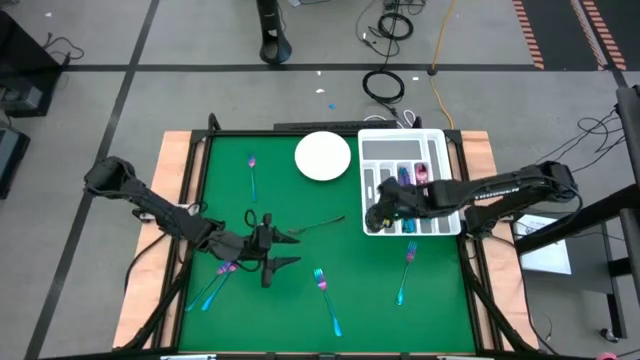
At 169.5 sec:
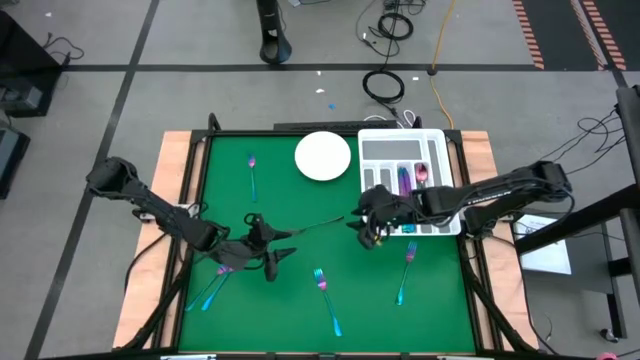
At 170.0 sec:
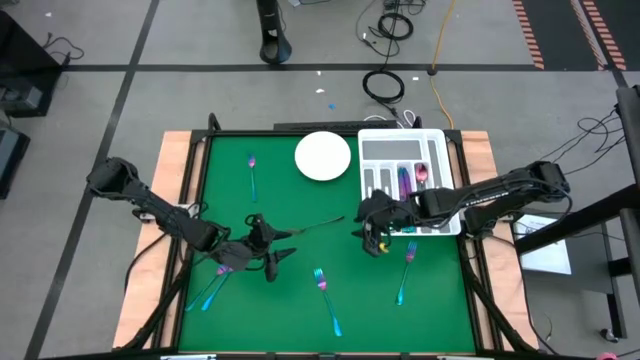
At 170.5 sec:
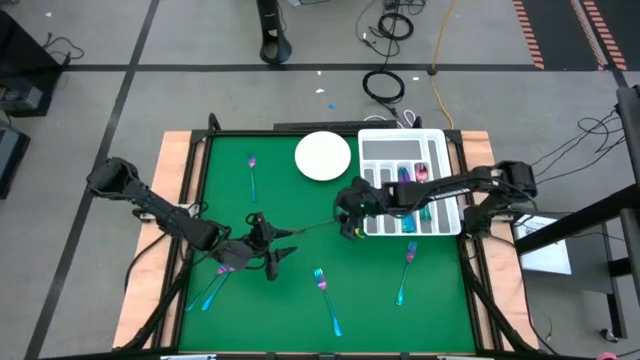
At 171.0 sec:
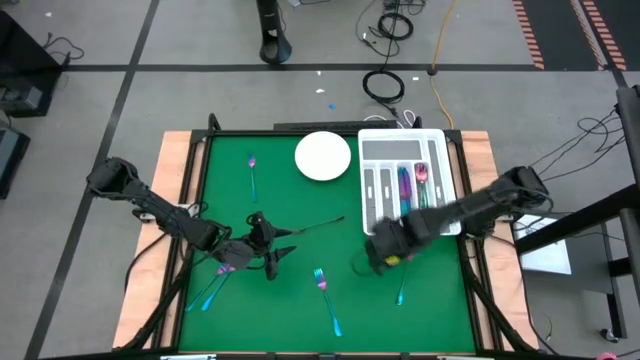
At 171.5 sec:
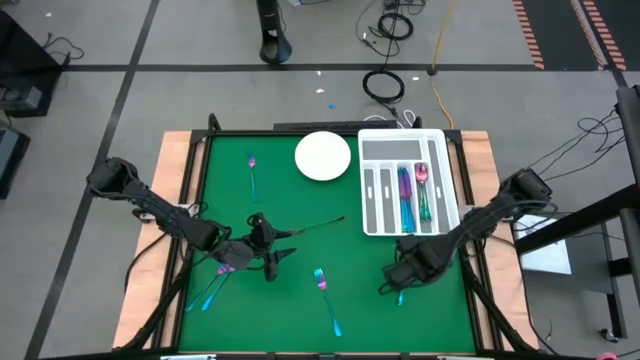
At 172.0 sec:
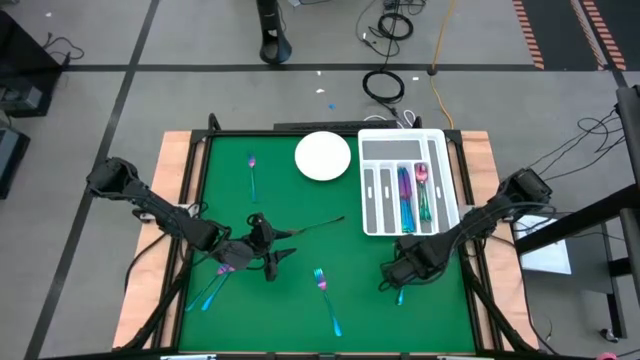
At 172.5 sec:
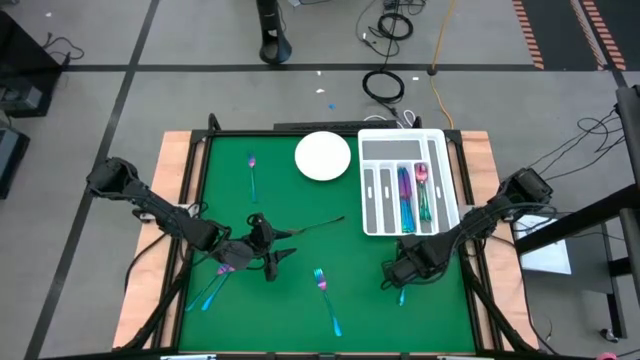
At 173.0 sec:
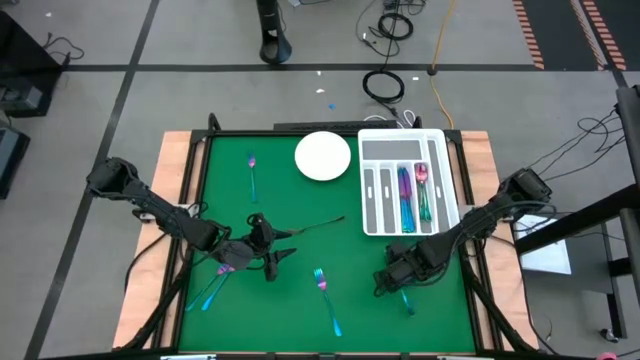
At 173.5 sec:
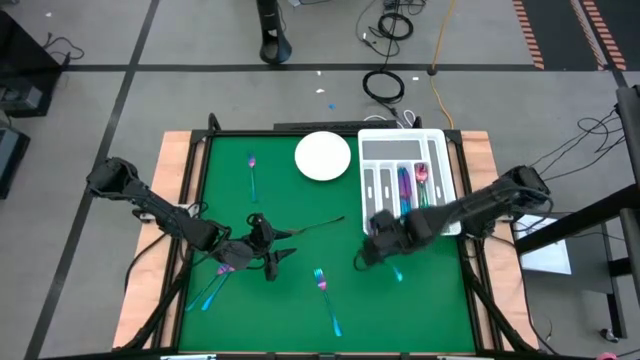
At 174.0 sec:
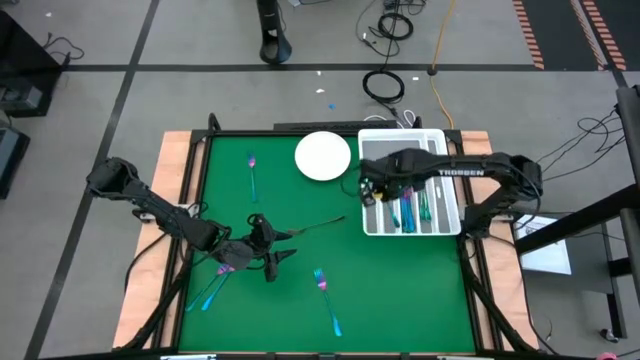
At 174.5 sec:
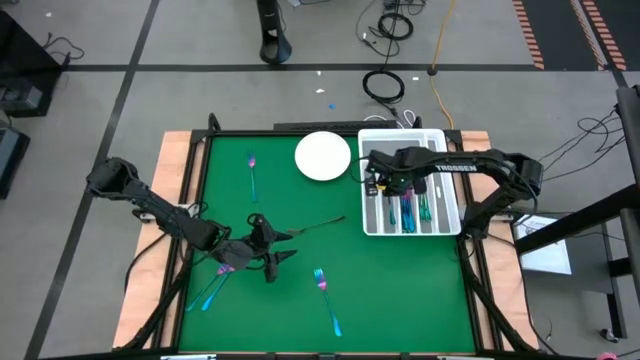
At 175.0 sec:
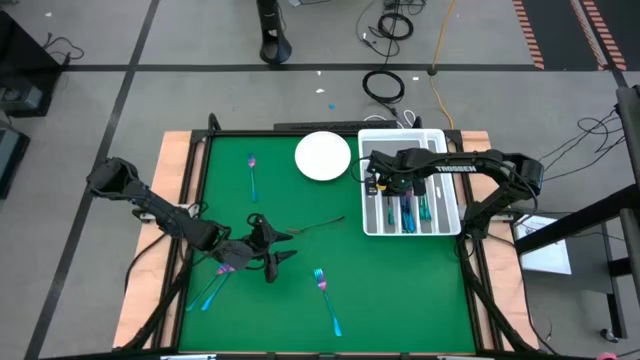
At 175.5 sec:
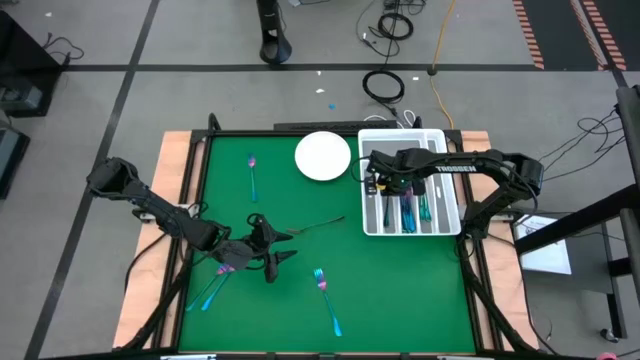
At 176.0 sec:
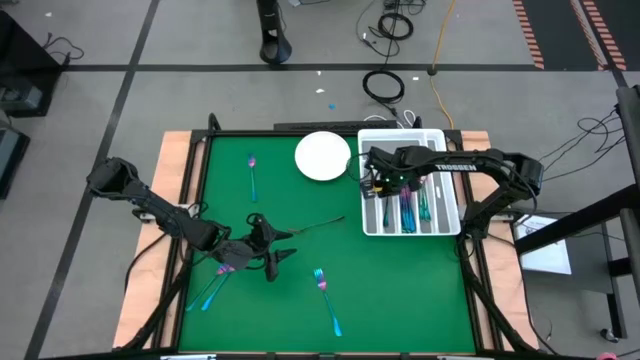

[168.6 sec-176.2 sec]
Task: Sort silverware
Put the iridescent fork into the white silverware tray

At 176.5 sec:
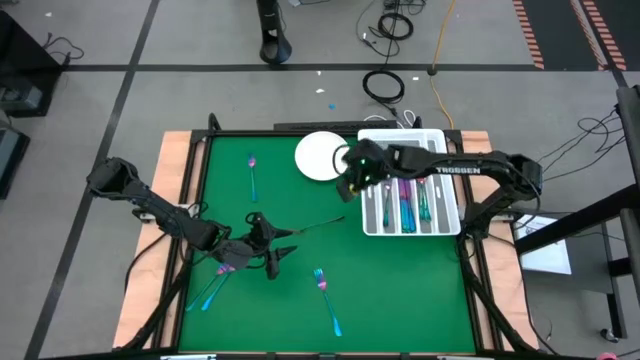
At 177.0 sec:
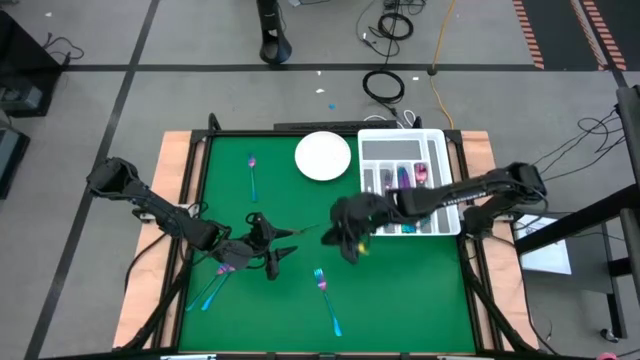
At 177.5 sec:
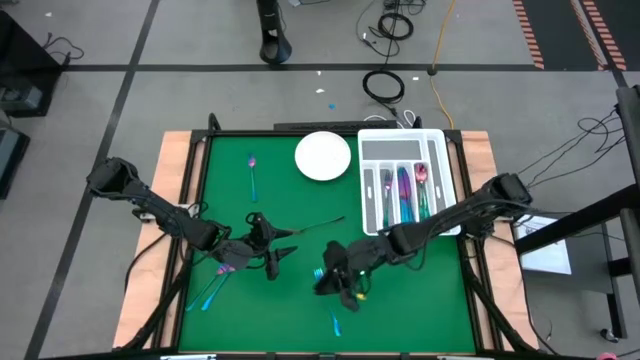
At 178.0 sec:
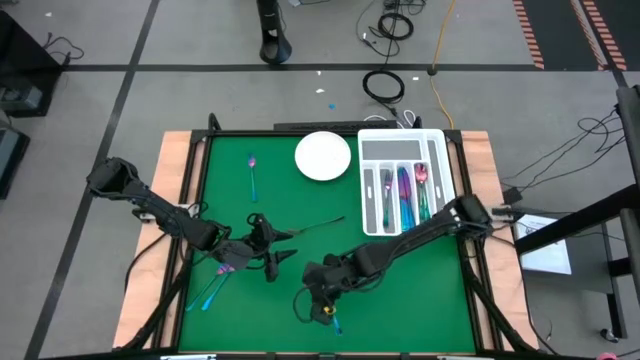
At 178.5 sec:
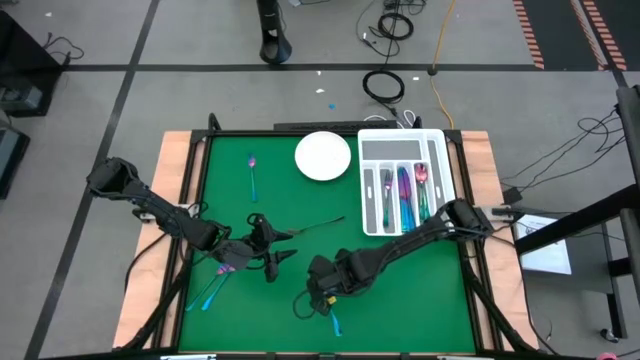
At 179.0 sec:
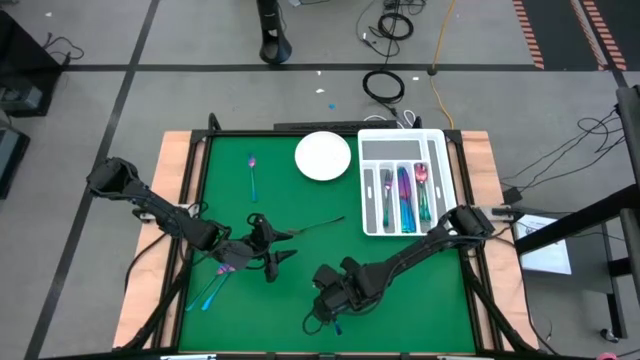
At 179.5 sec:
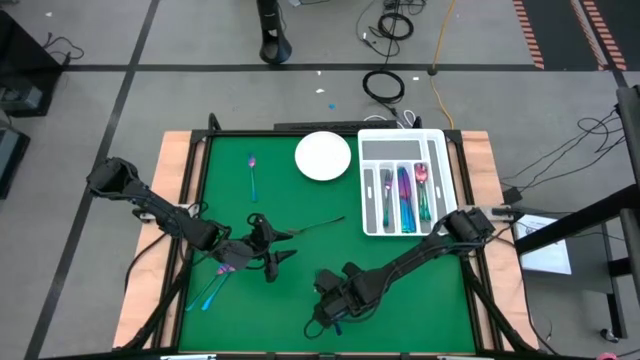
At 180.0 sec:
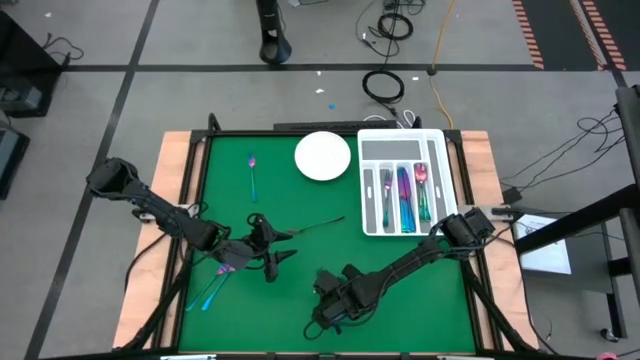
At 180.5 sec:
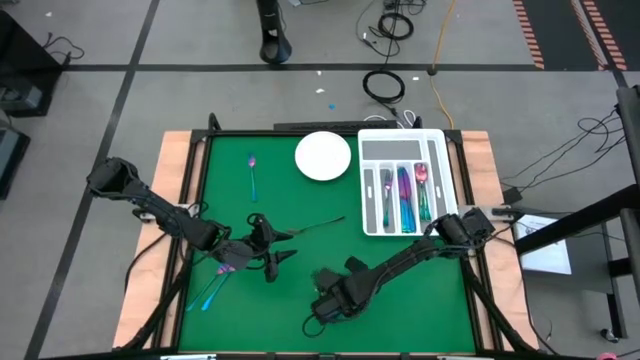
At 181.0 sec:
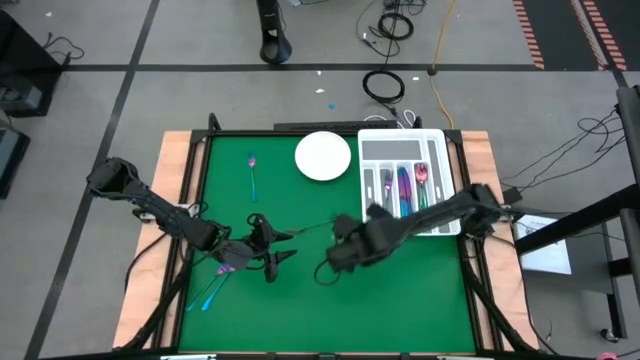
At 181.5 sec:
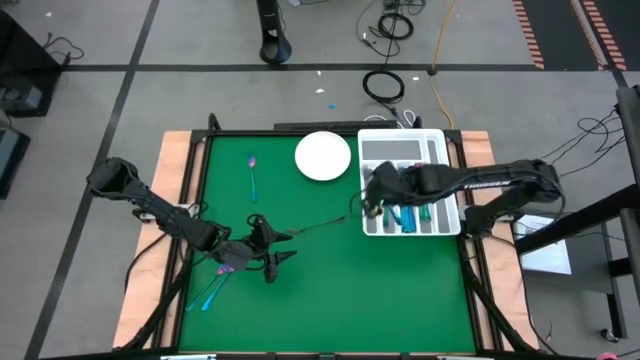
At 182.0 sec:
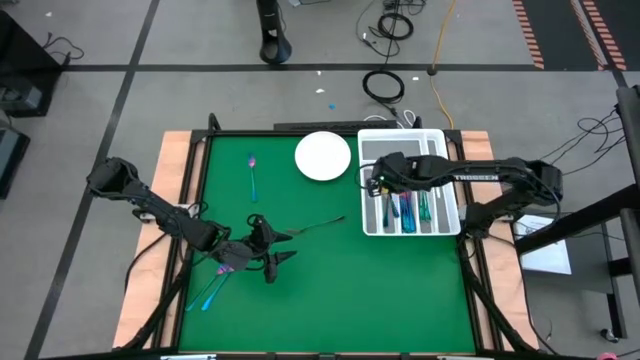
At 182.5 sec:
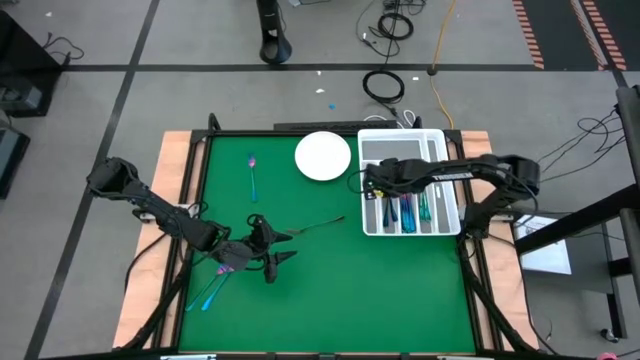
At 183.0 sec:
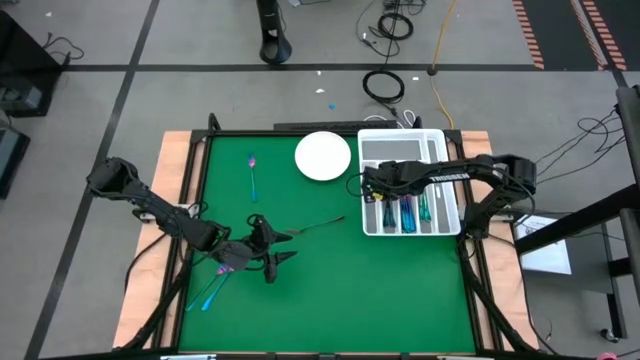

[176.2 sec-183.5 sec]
Put the iridescent fork into the white silverware tray

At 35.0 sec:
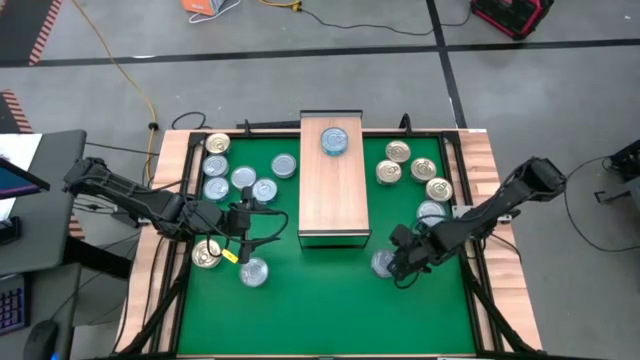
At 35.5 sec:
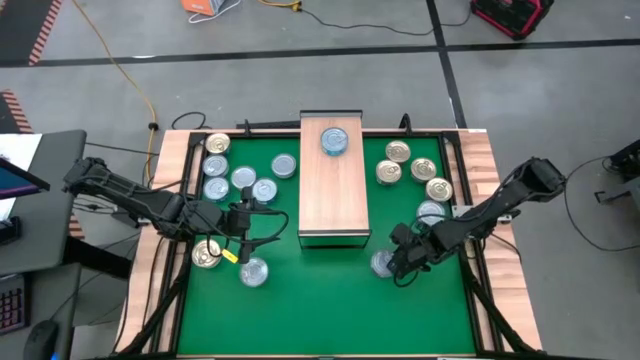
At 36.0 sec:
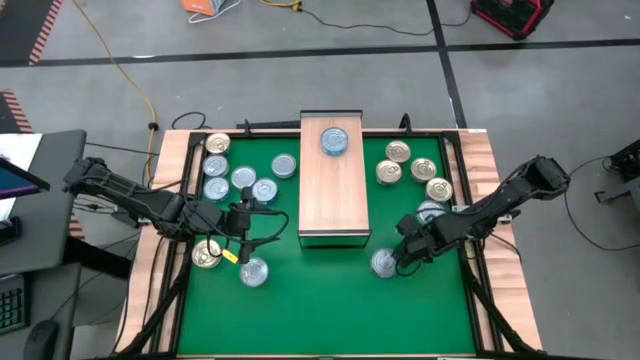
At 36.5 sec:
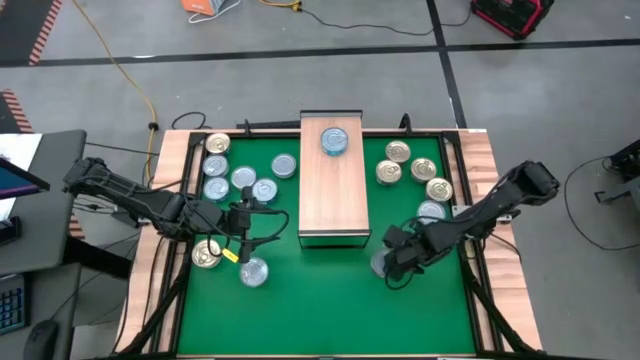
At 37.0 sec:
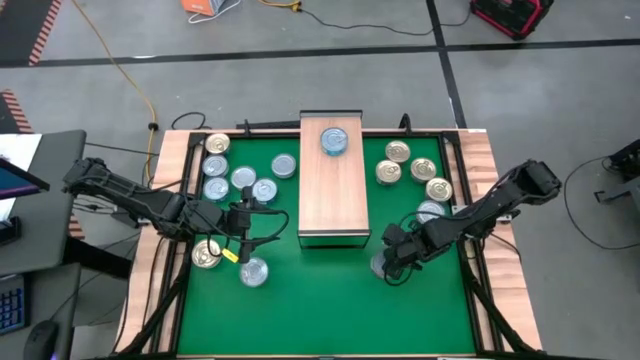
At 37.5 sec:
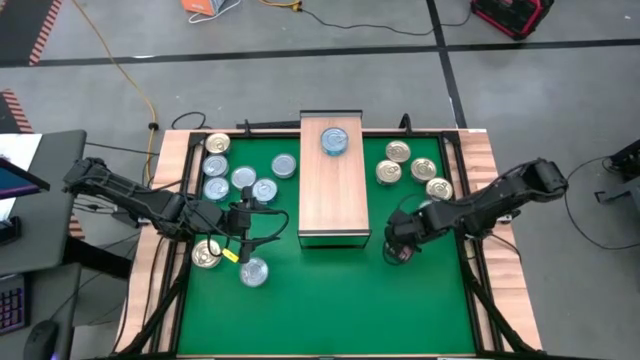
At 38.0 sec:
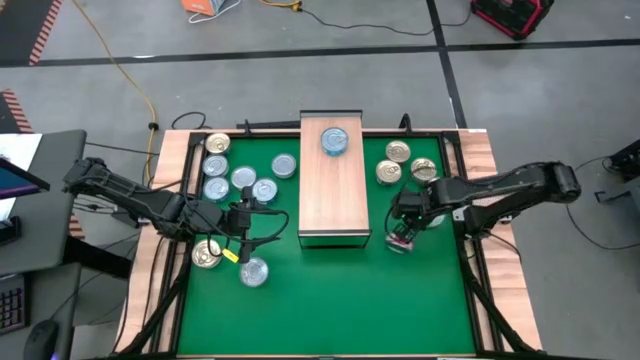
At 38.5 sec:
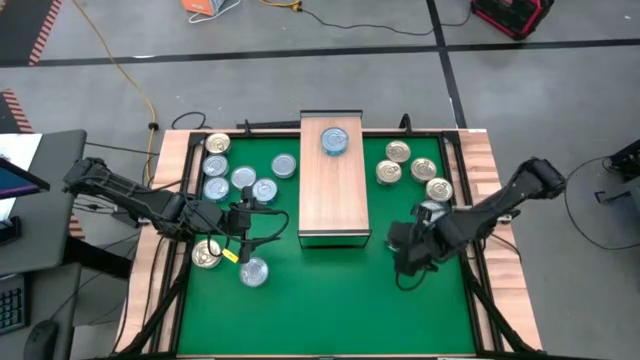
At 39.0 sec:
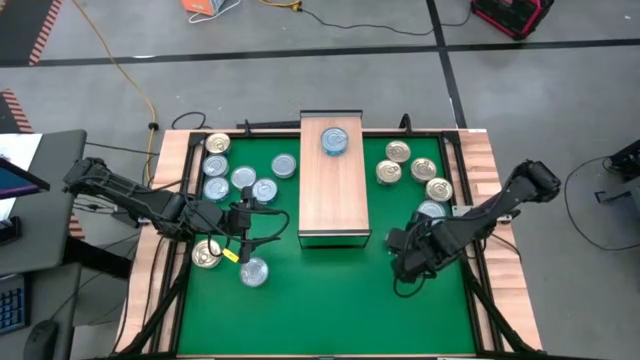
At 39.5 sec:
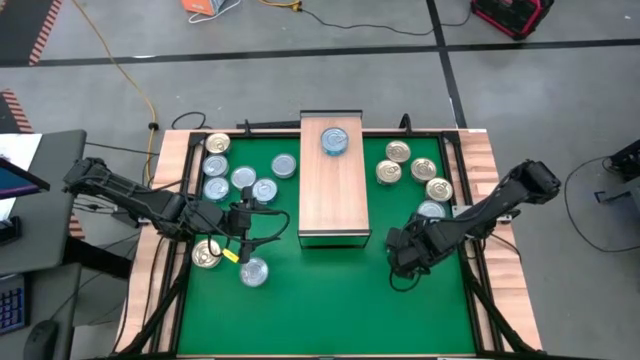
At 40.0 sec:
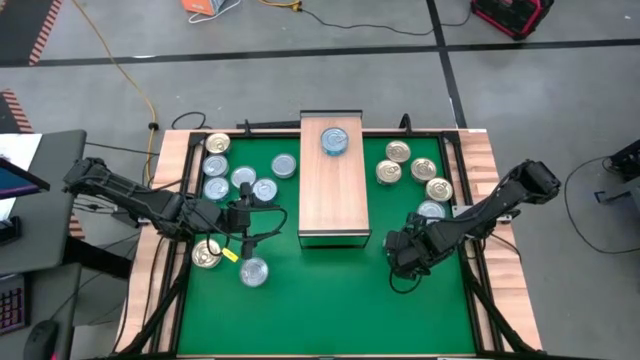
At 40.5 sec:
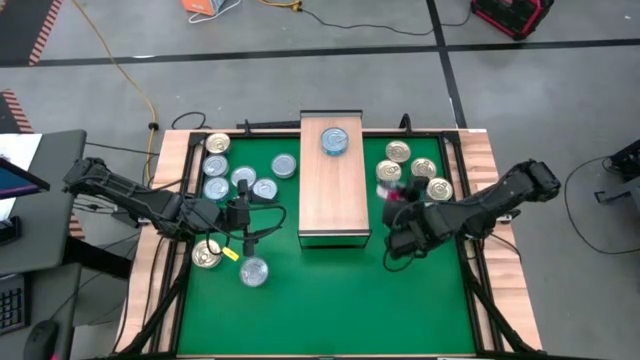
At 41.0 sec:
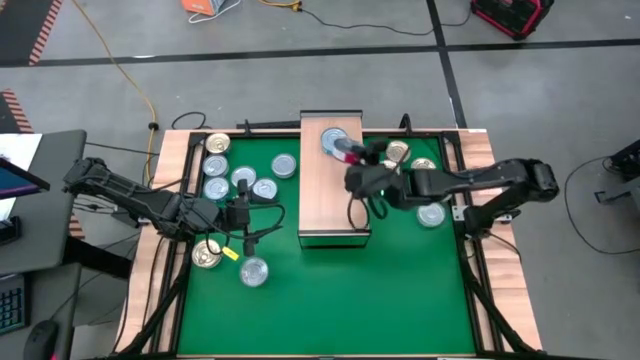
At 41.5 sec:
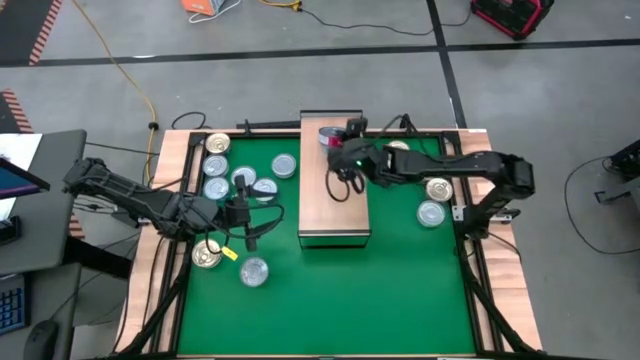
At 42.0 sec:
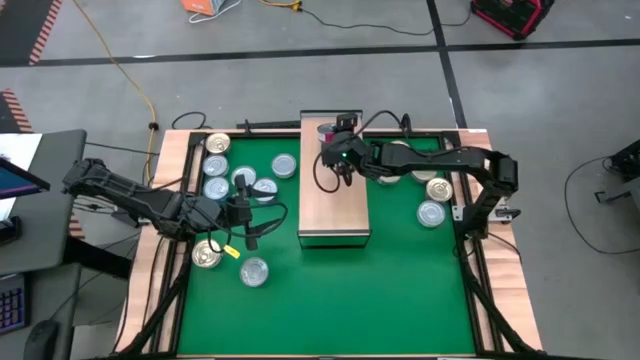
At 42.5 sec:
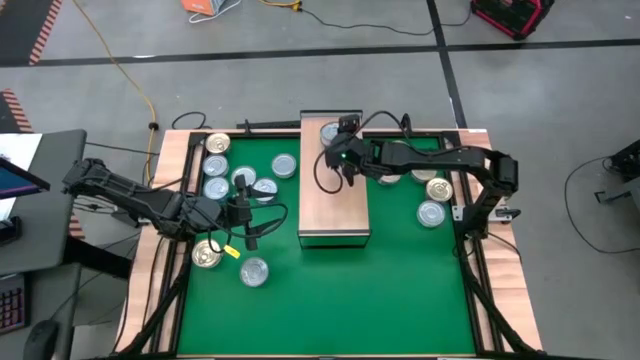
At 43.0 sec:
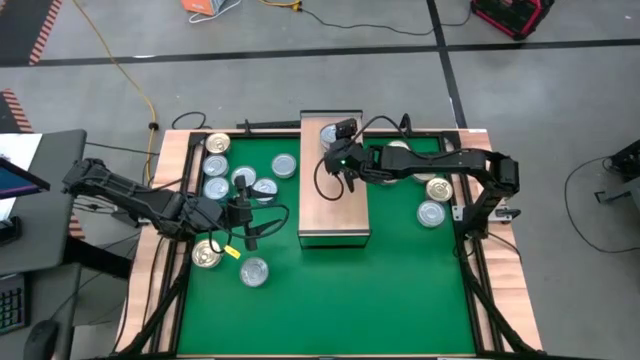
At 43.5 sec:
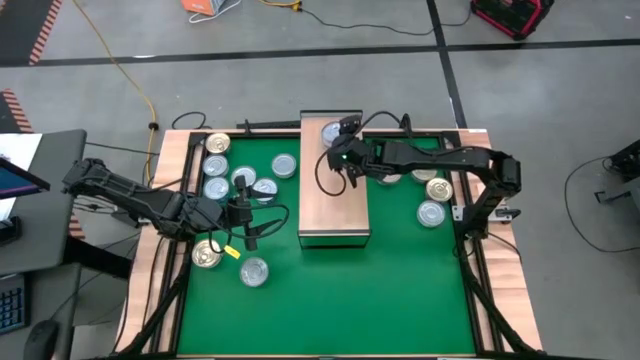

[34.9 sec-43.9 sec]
Task: Stack canned seafood by type on shelf
Stack the red tuna can on top of the light blue tuna can on the shelf
